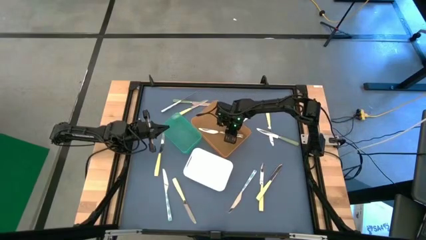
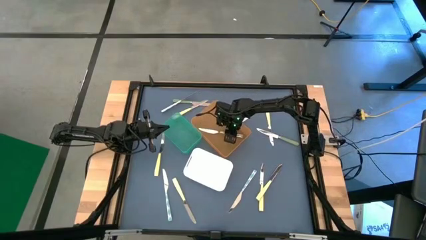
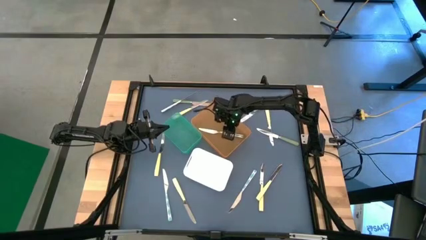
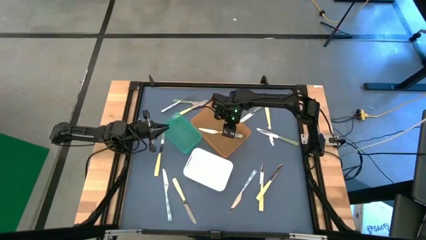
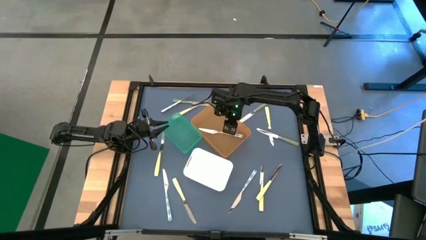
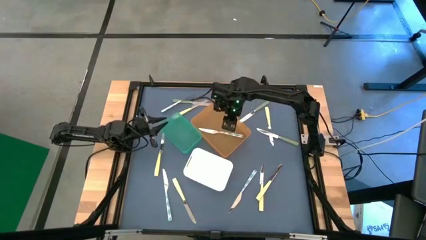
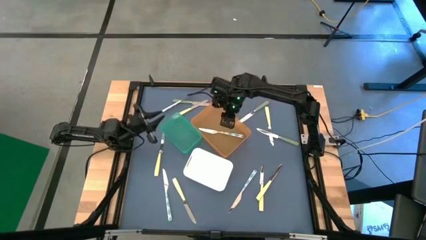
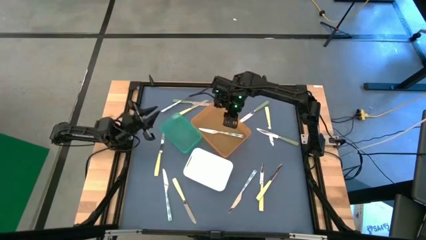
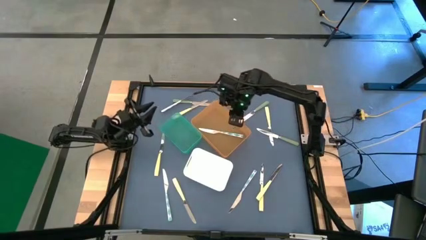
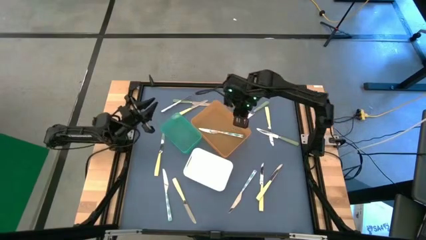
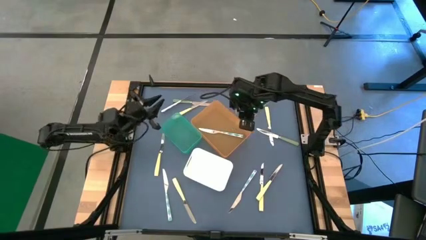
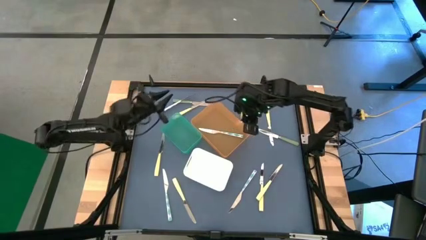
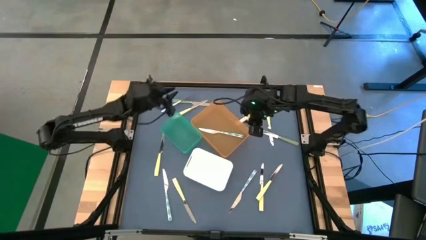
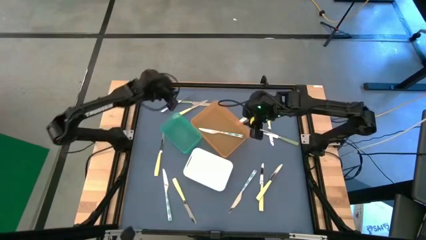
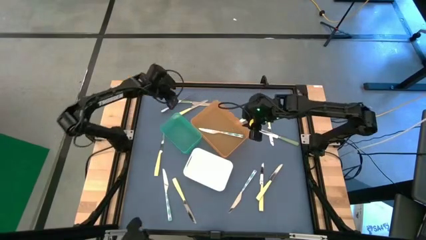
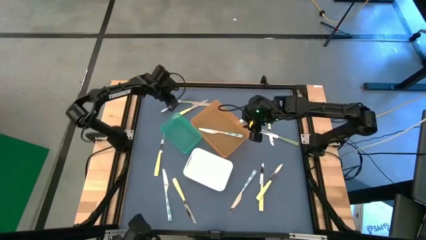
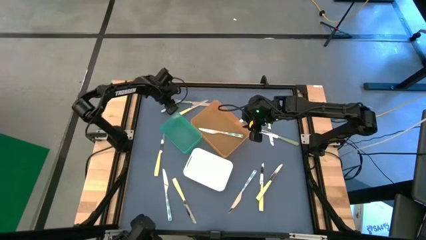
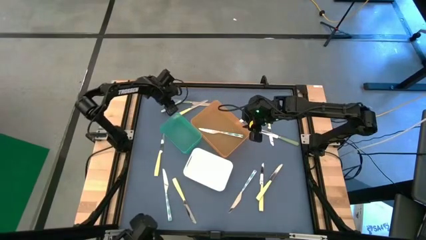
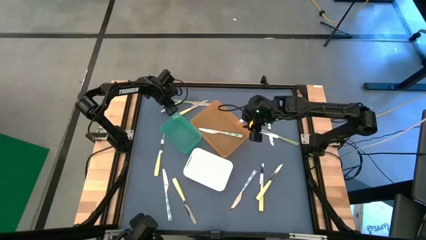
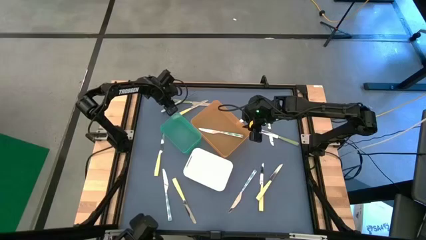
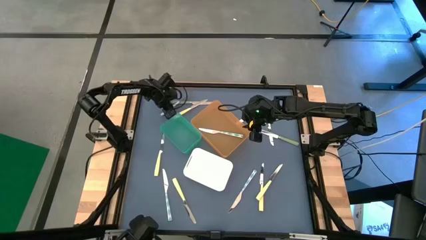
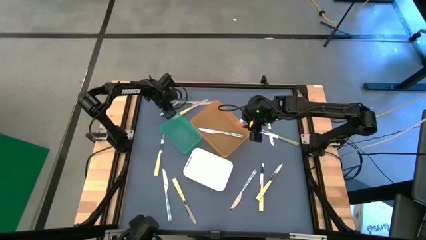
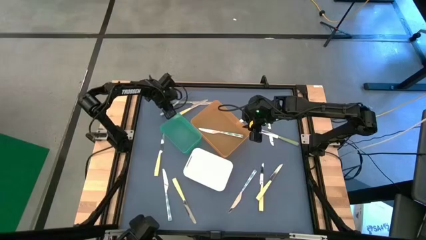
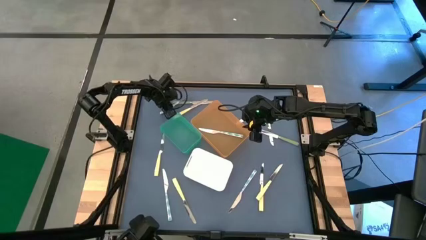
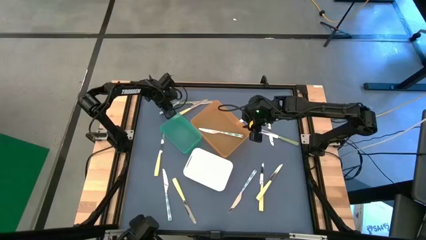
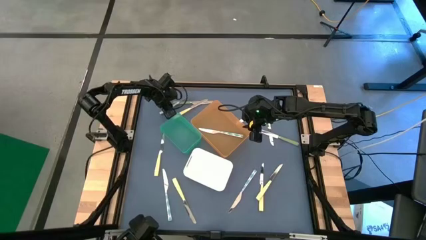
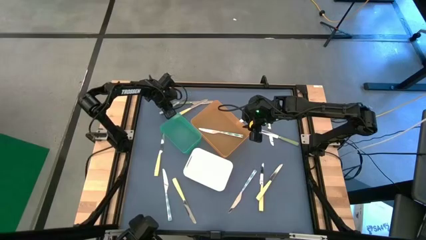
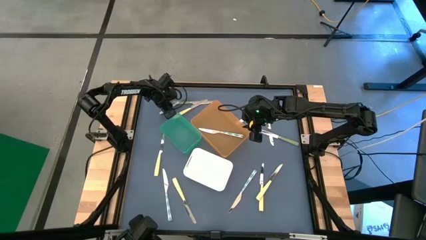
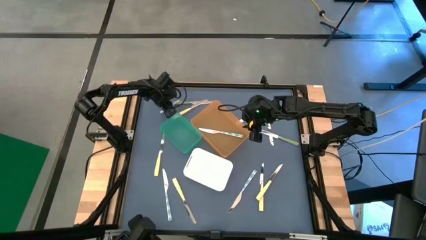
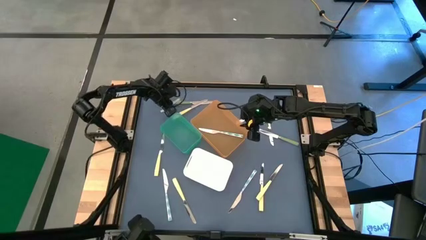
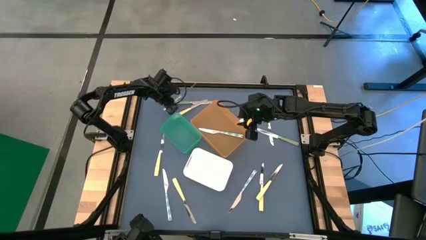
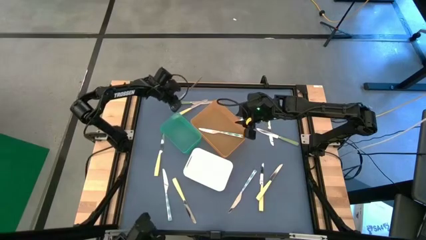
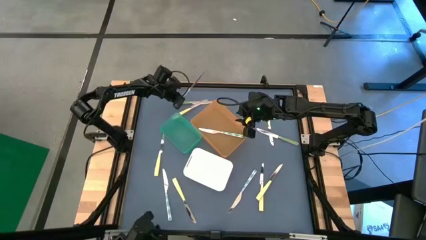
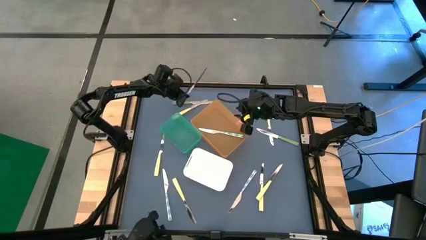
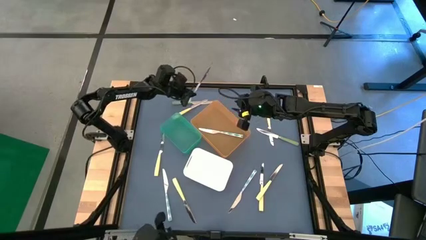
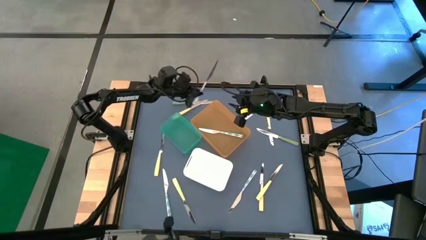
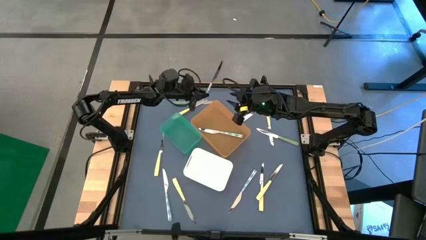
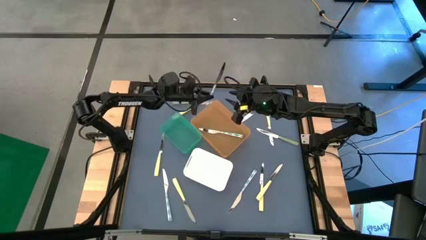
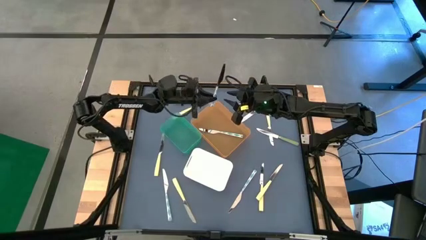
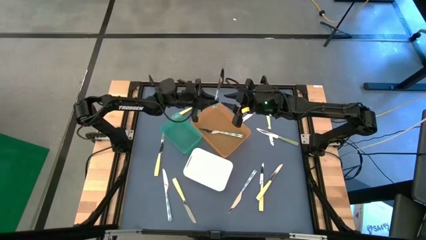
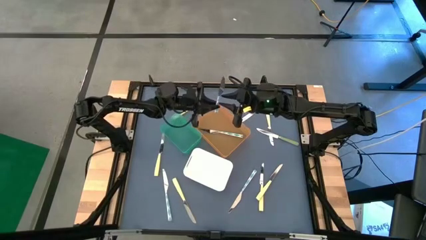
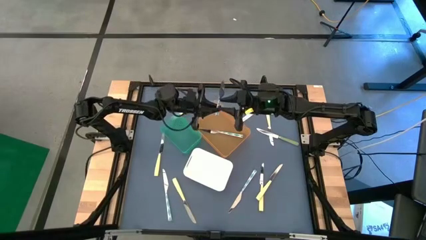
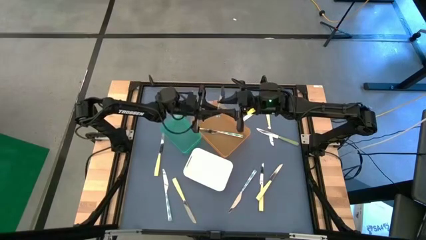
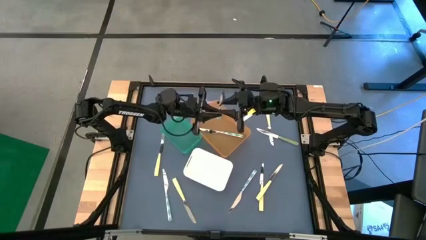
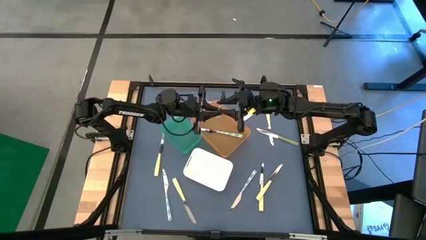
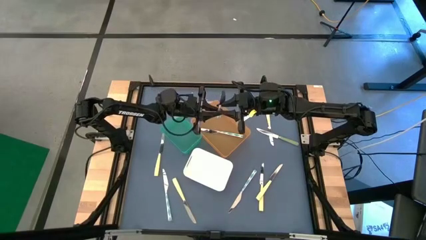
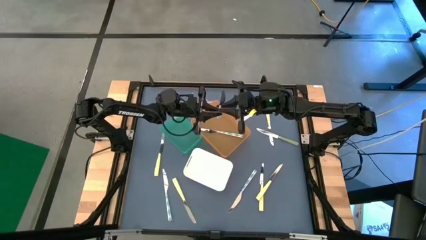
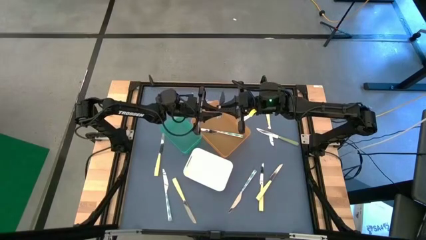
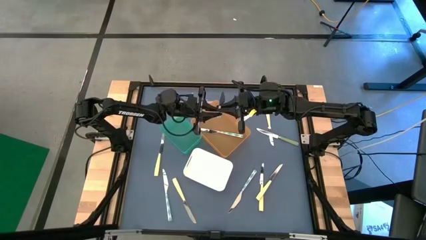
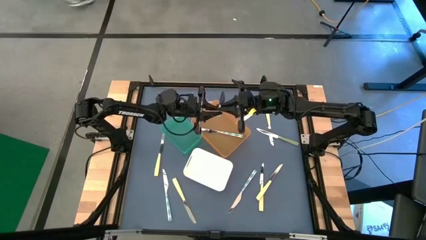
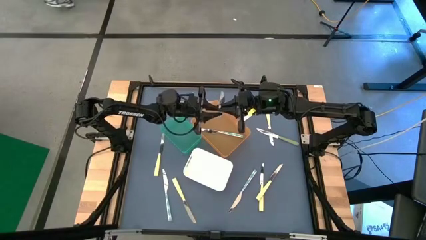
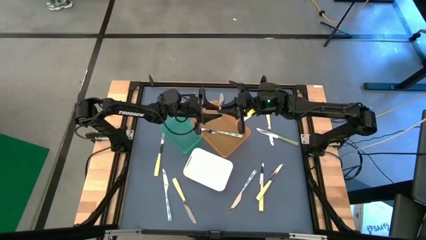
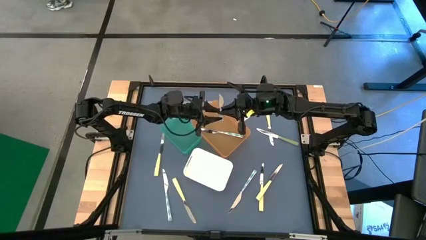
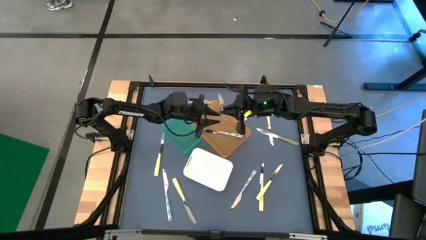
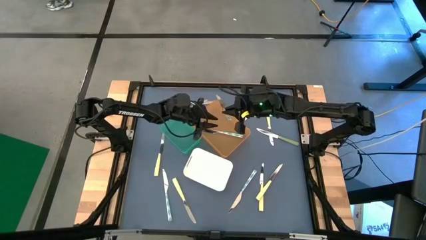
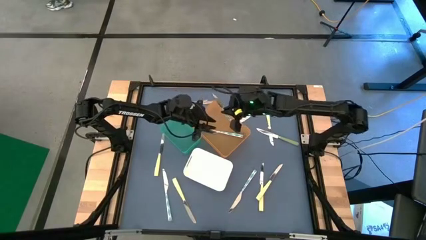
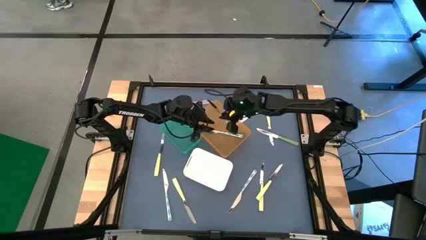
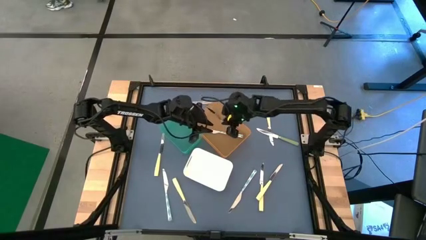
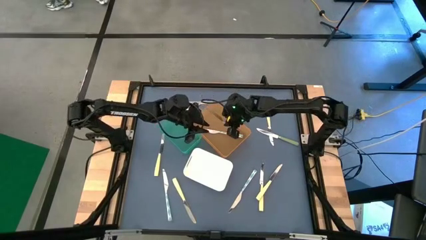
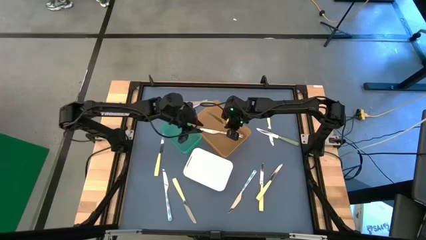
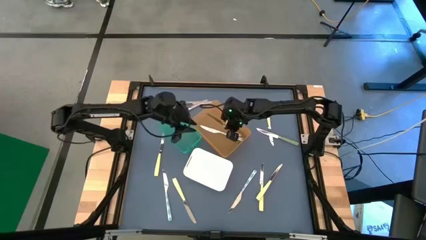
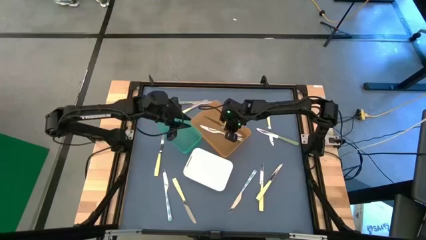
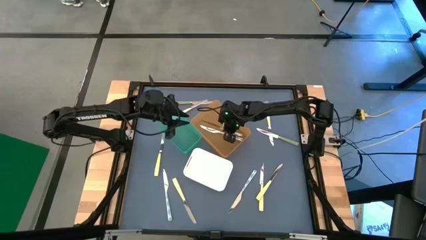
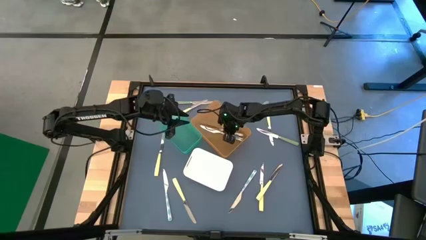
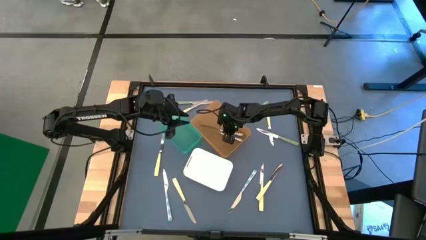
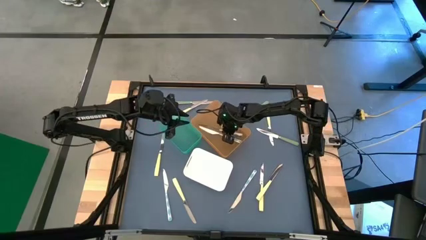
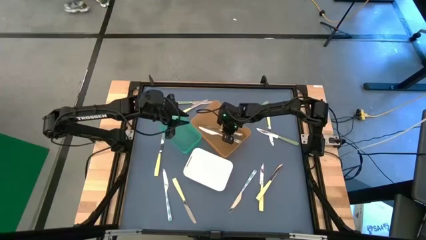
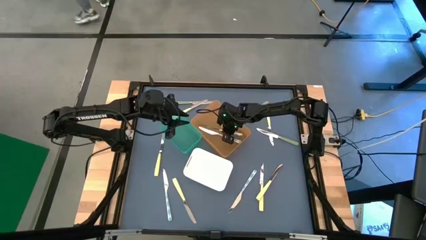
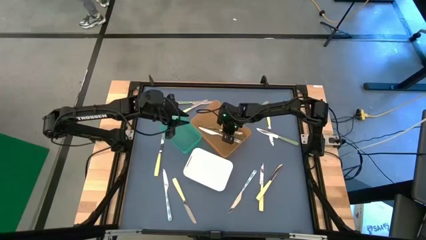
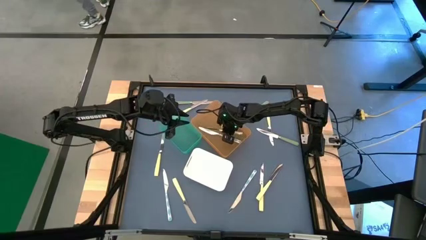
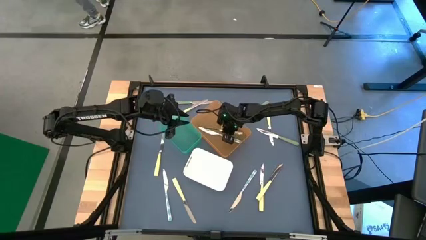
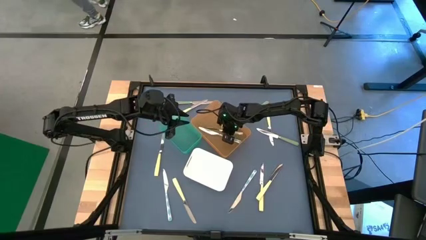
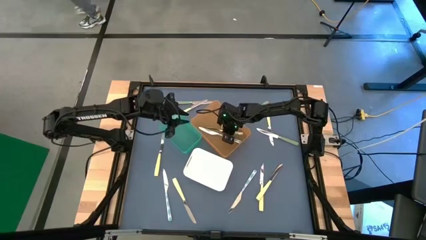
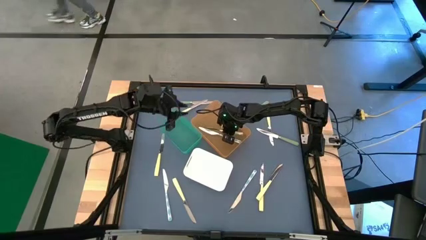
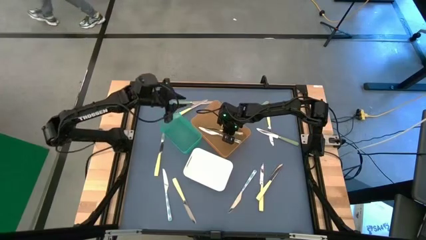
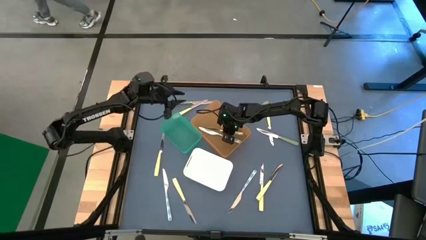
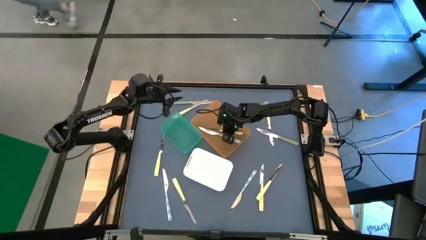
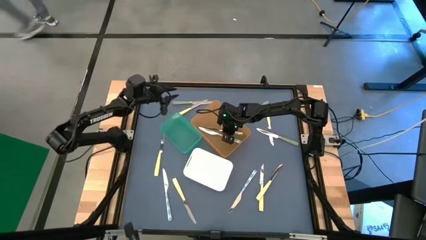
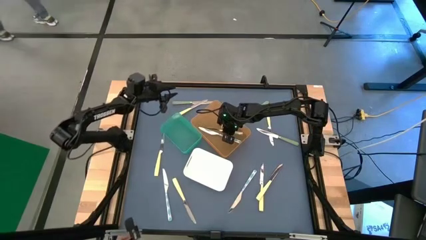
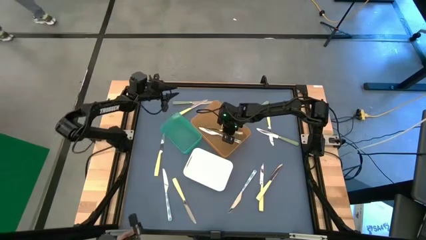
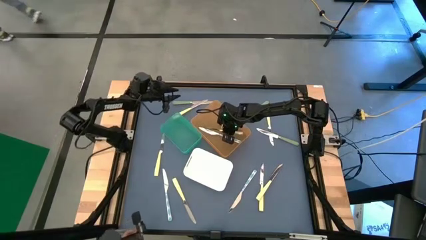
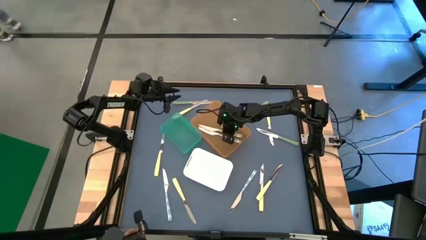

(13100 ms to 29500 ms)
Task: Sort silverware by color (type)
Put the blue table knife into the orange bin
